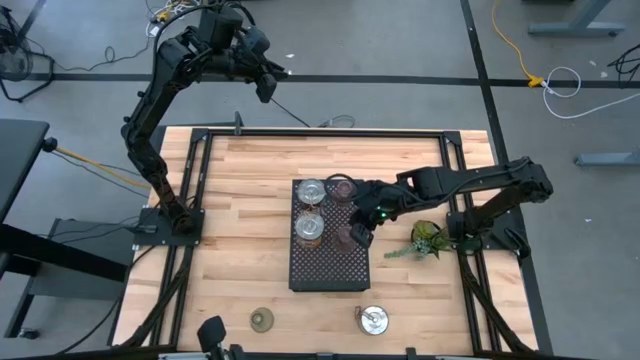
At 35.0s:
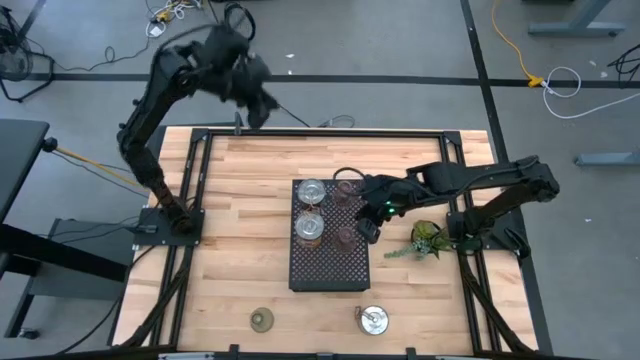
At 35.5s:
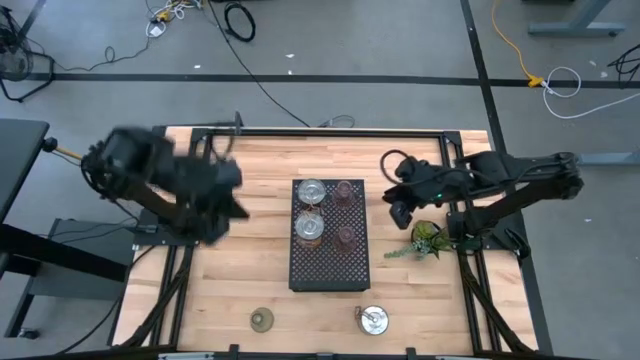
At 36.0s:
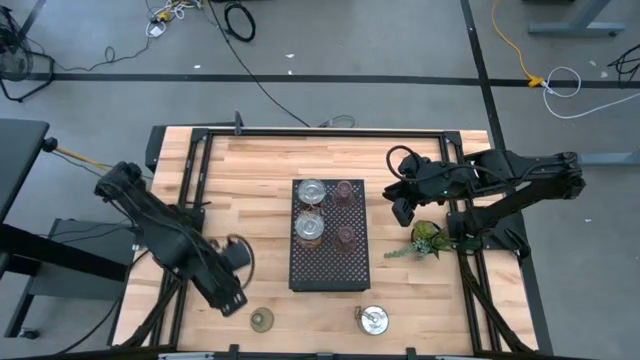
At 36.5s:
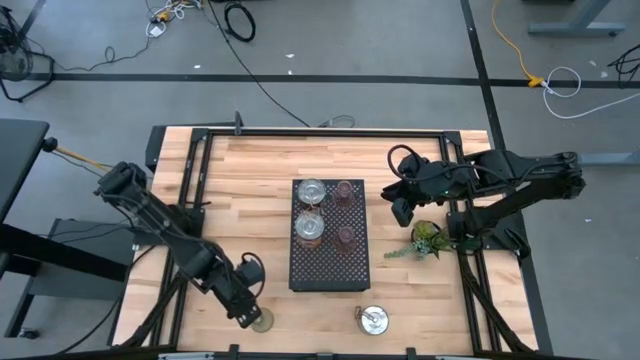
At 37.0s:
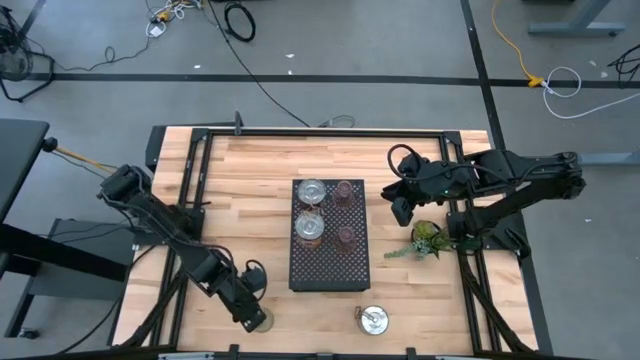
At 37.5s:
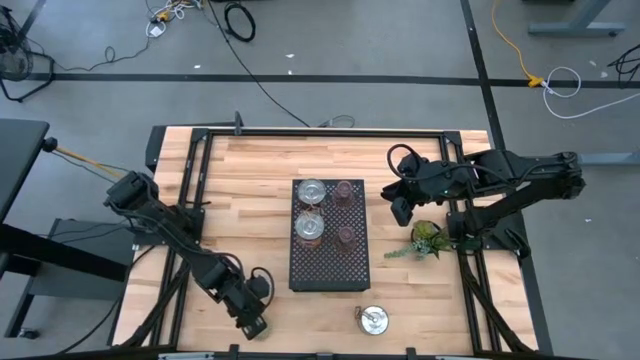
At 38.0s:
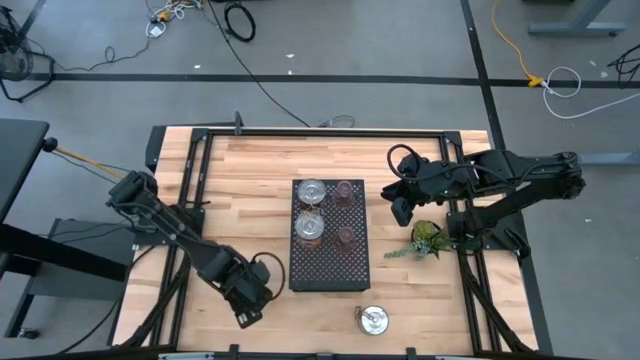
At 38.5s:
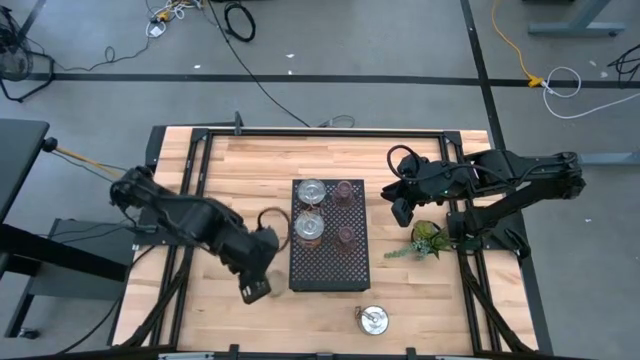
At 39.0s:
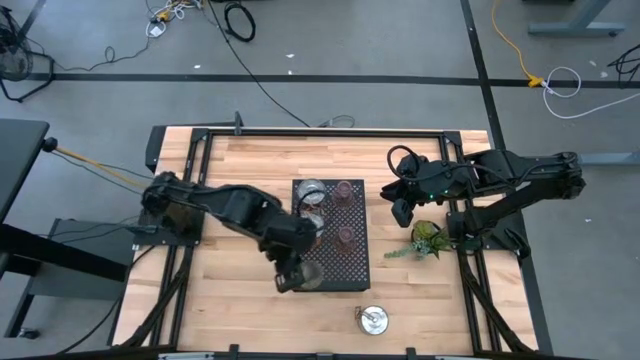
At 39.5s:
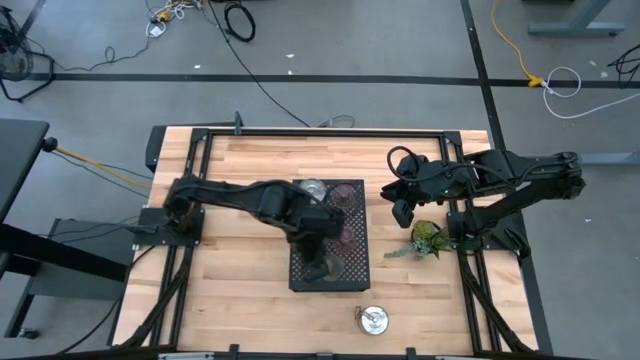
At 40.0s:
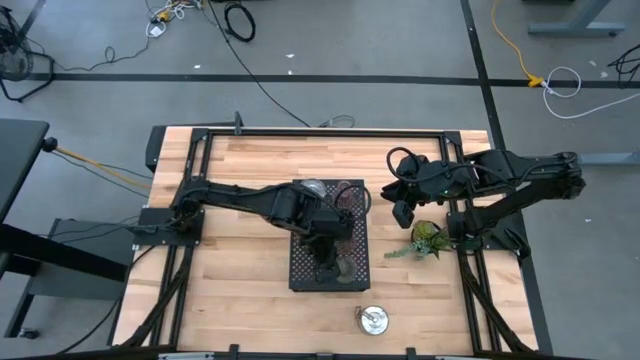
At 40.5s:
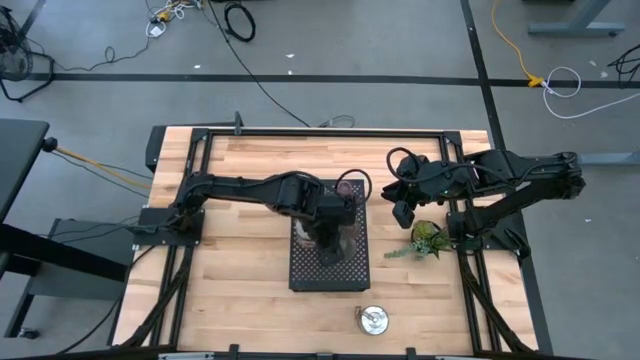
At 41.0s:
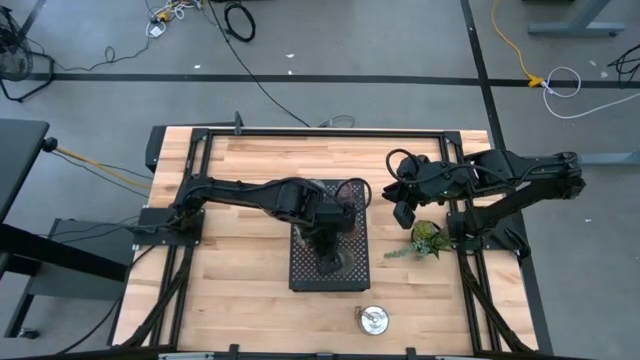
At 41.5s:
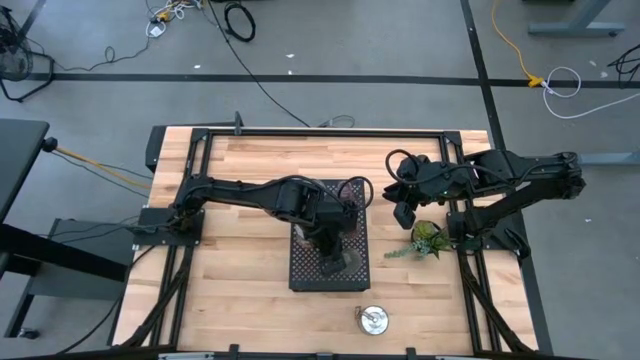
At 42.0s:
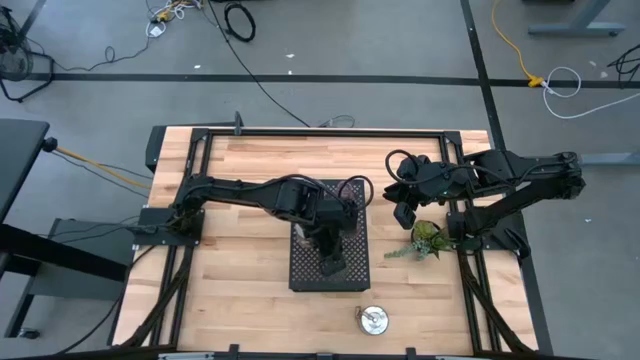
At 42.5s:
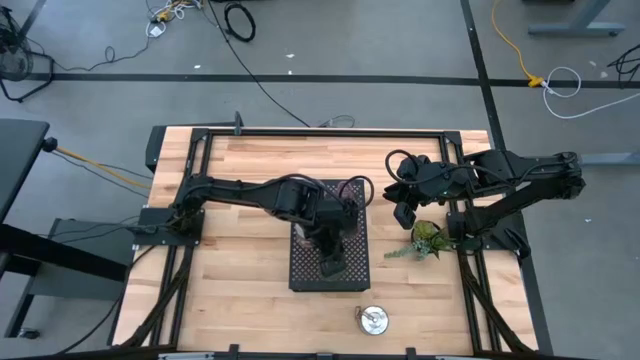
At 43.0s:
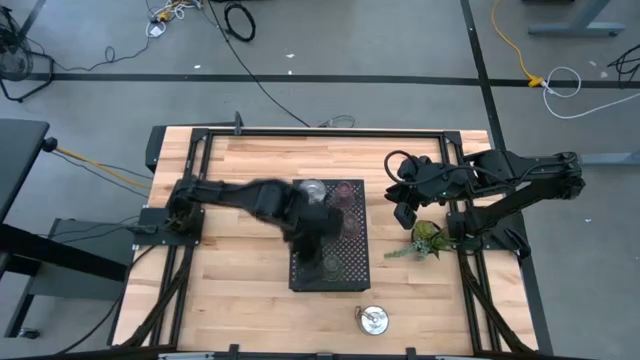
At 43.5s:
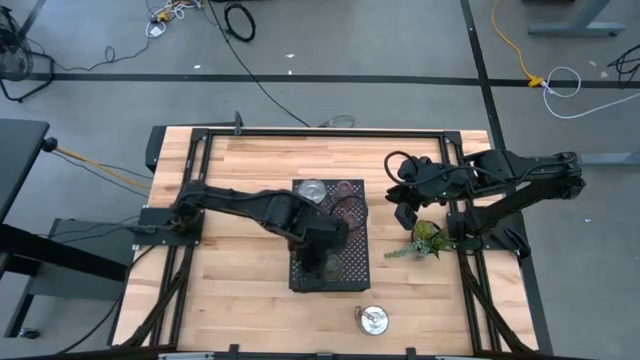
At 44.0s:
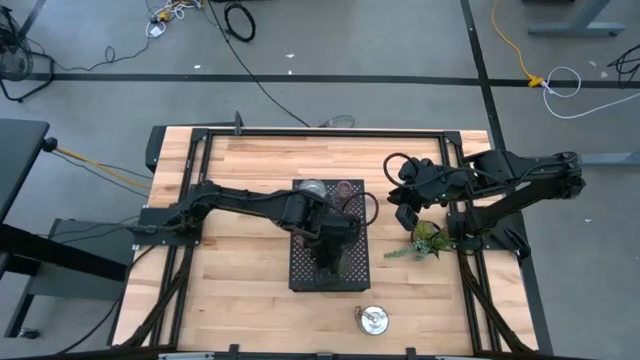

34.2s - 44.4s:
Task: Pick & Place candle stick holders
Put the green glass candle holder on the shelf

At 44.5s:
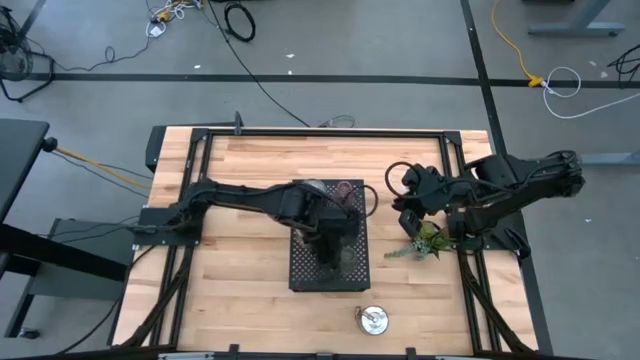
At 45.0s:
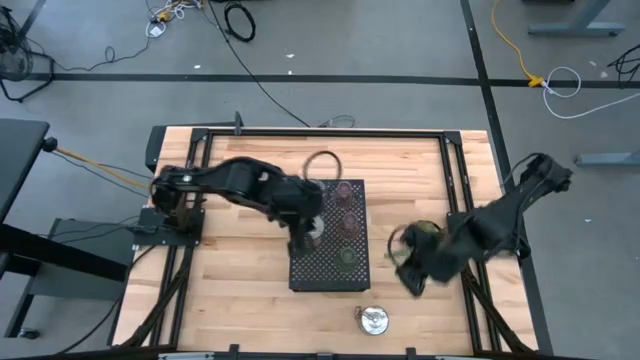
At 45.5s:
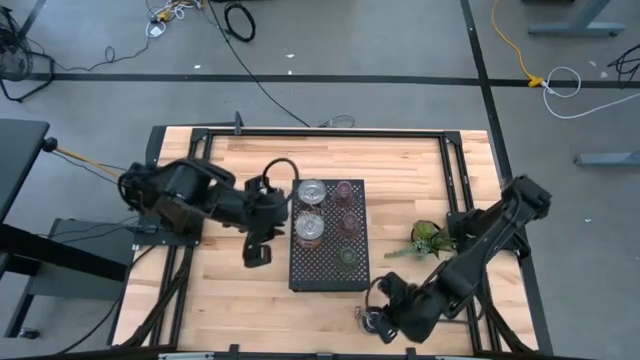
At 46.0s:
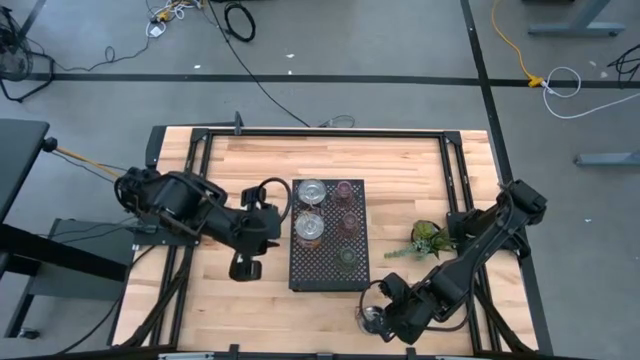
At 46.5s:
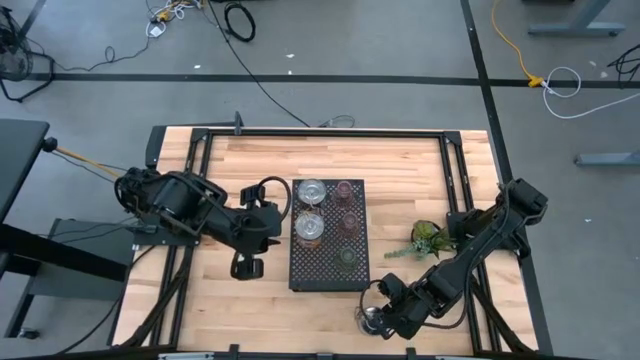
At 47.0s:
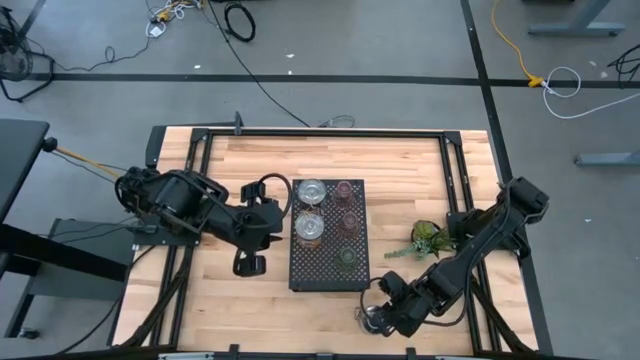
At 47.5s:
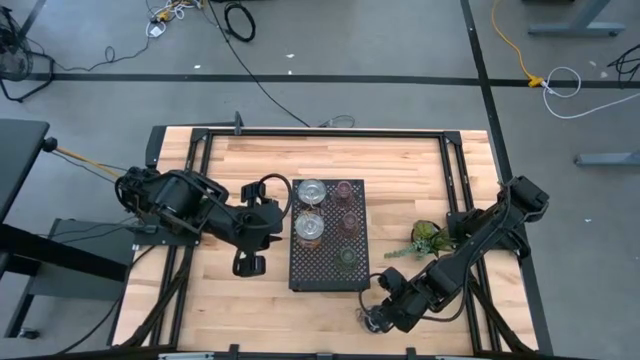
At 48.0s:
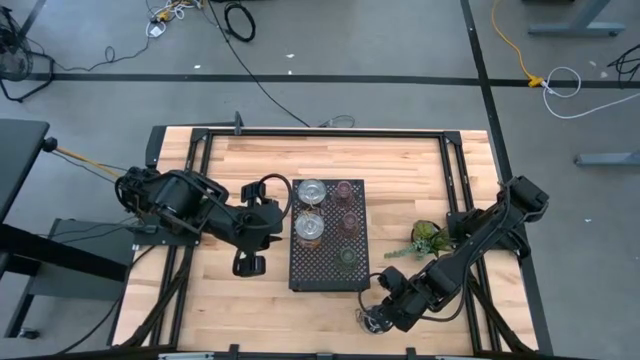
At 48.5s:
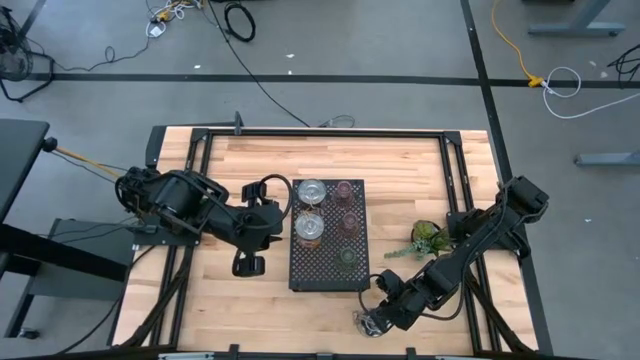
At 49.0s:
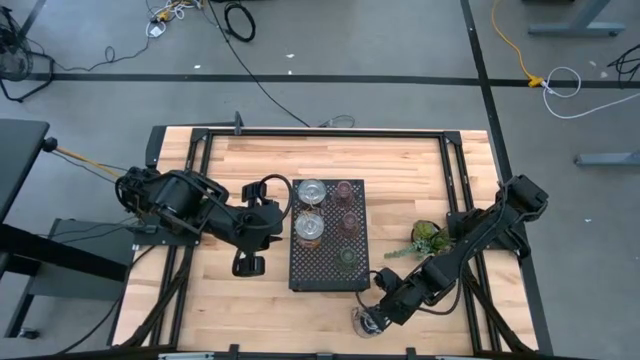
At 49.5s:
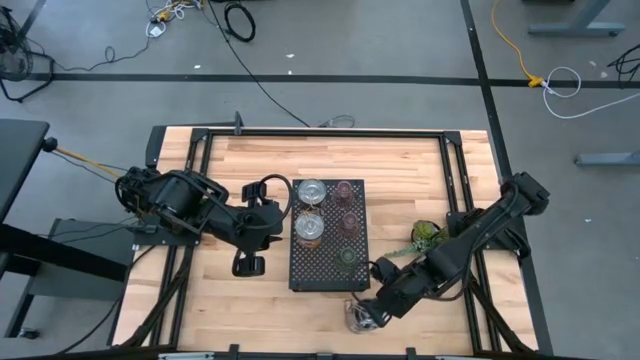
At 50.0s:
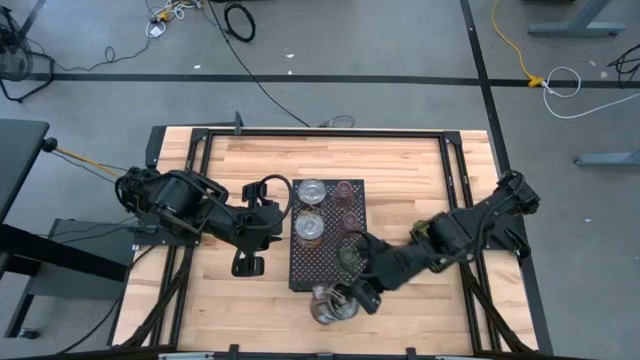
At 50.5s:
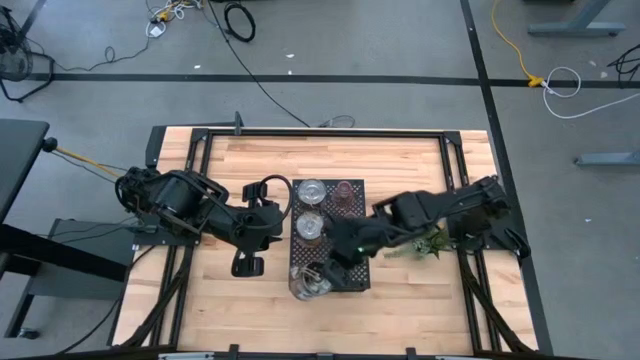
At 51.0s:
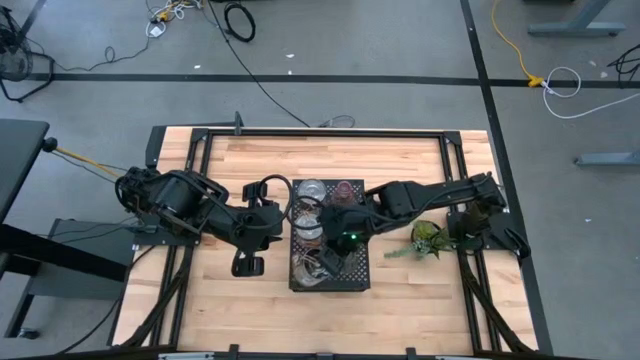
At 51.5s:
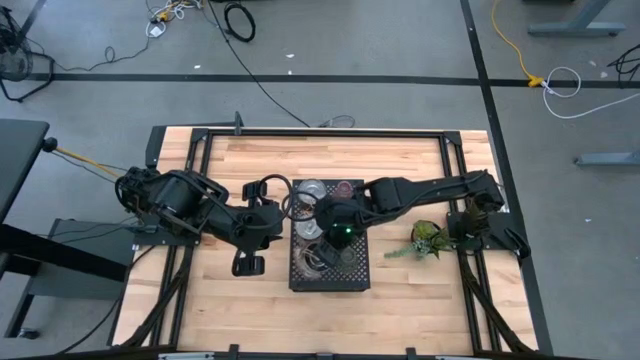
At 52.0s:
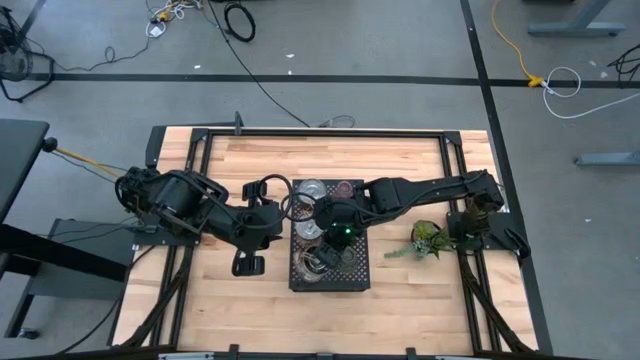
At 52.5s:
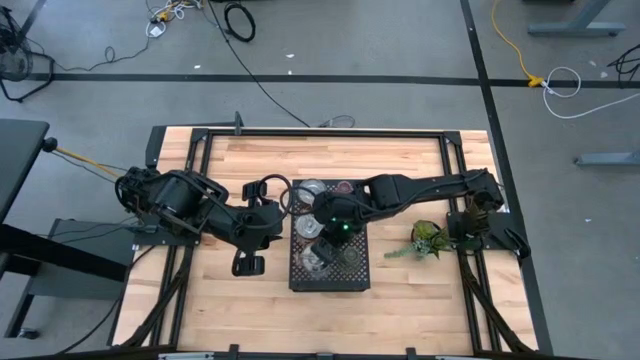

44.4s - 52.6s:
Put the brown scented candle on the shelf

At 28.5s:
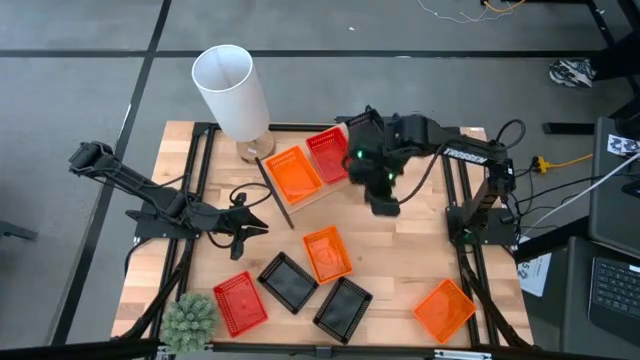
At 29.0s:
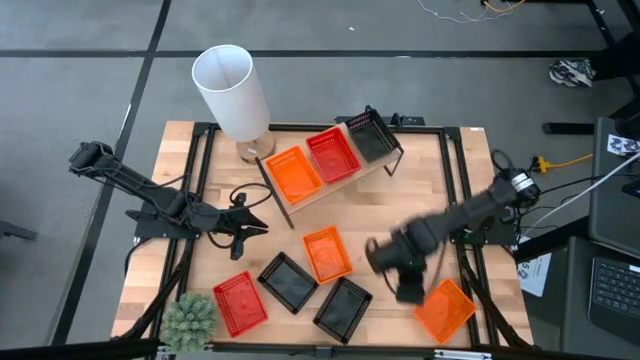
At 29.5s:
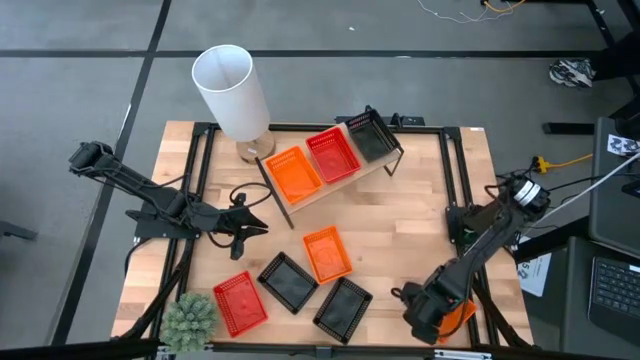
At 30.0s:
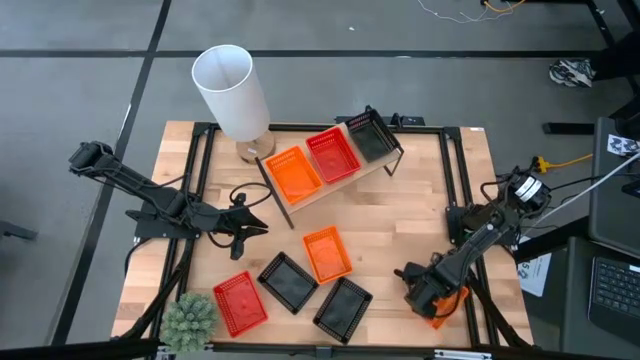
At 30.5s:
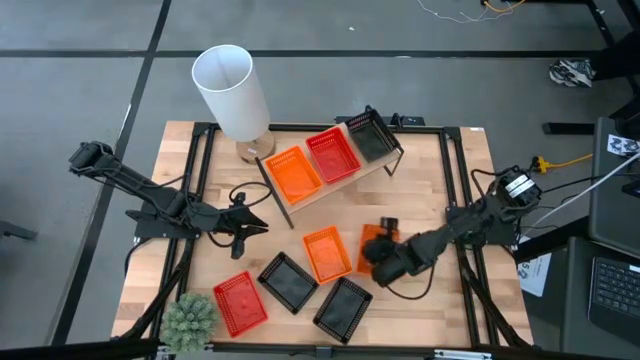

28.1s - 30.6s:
Task: Stack baskets on shelf by color
Move the bottom orange basket to the center of the table
